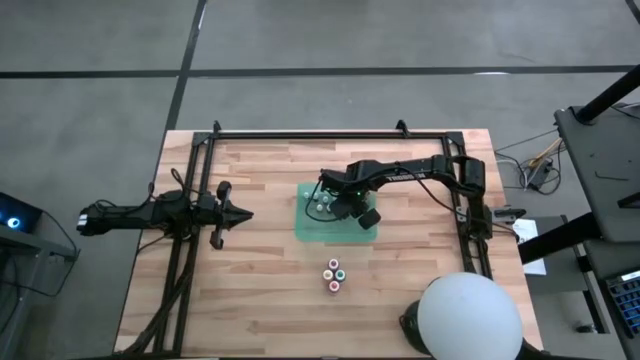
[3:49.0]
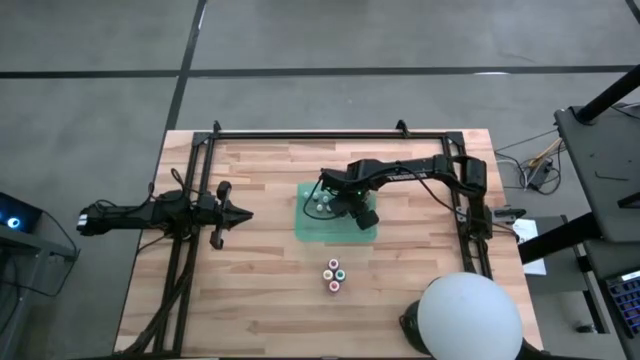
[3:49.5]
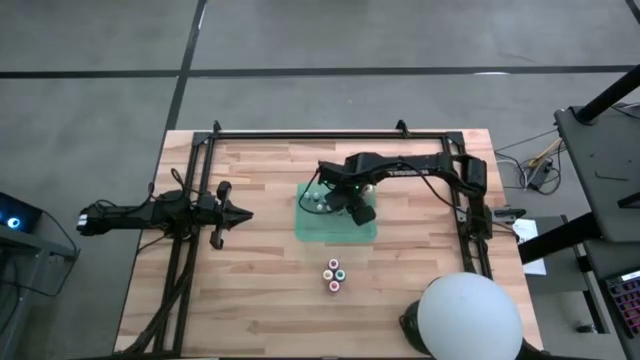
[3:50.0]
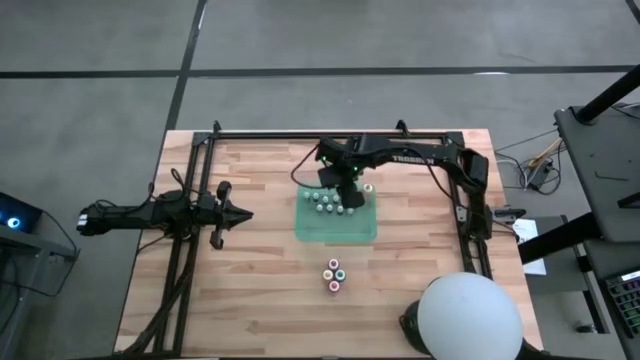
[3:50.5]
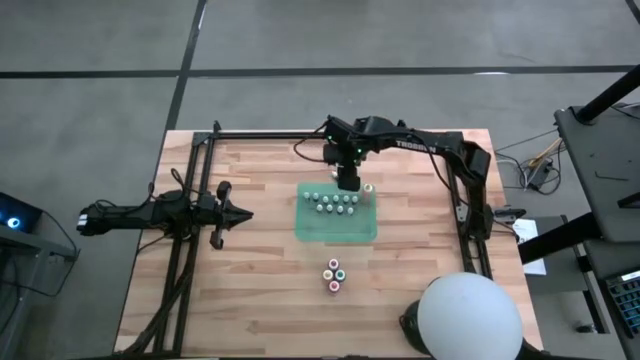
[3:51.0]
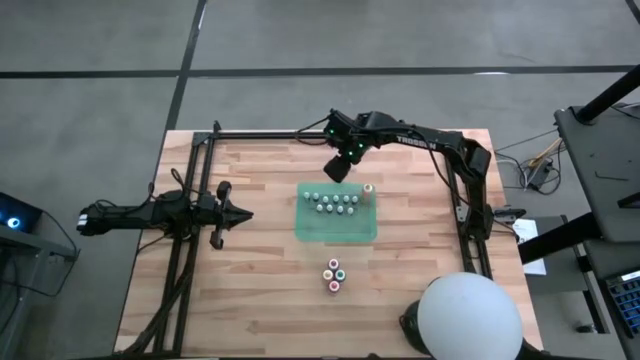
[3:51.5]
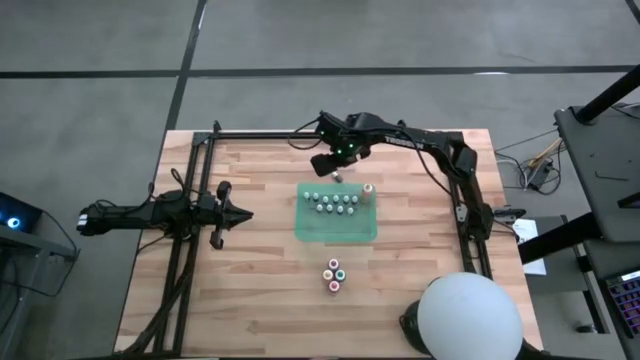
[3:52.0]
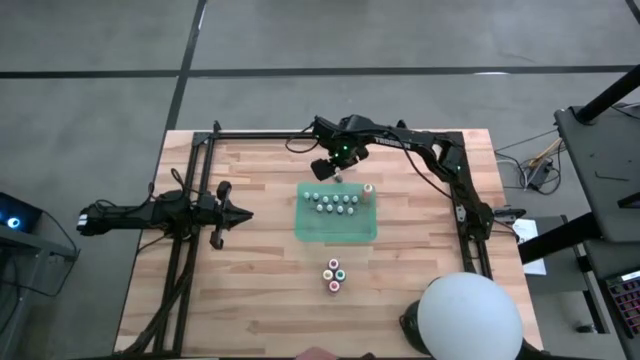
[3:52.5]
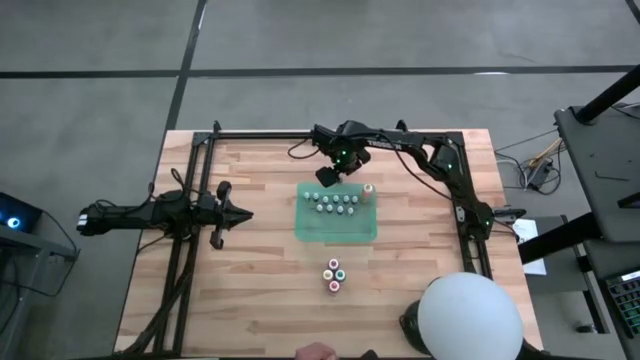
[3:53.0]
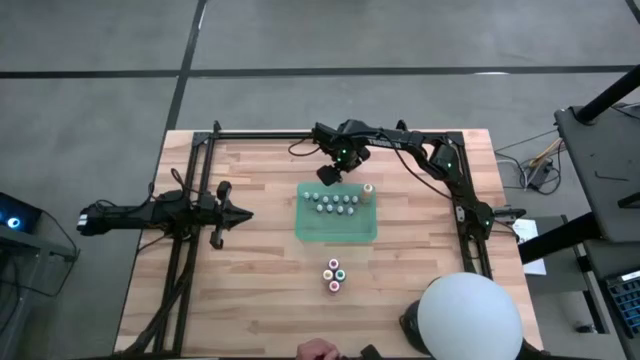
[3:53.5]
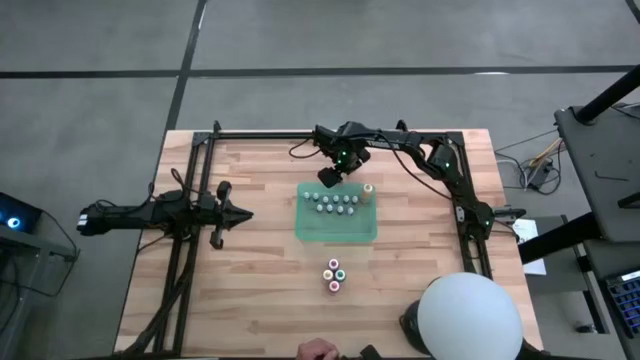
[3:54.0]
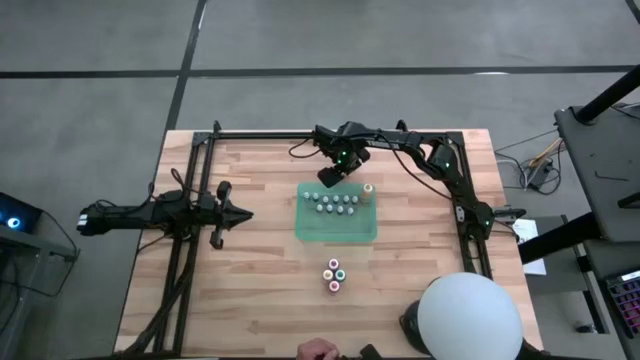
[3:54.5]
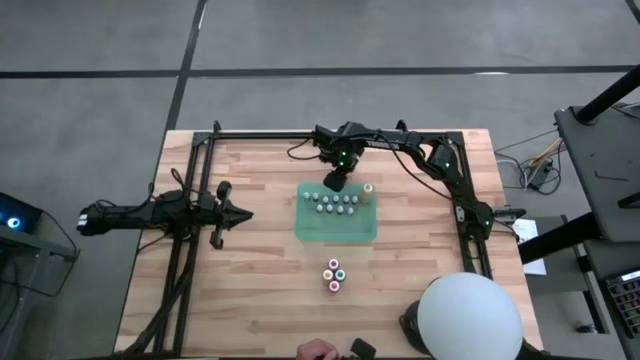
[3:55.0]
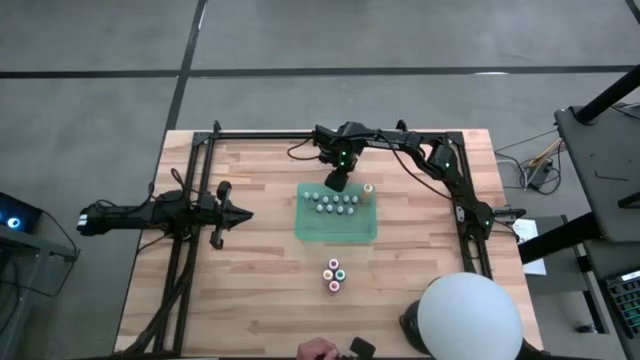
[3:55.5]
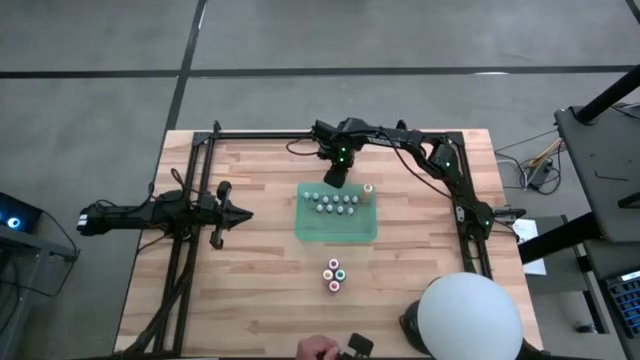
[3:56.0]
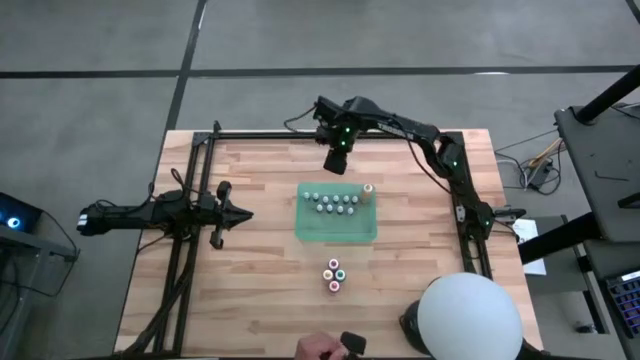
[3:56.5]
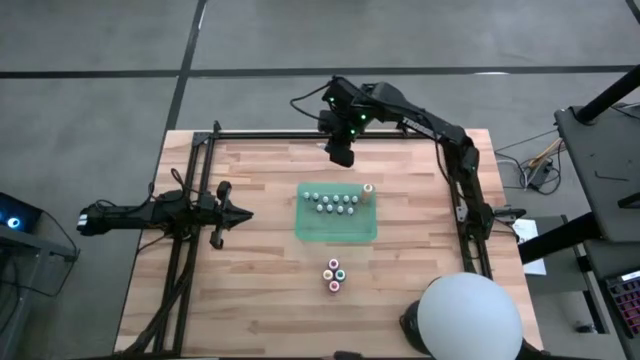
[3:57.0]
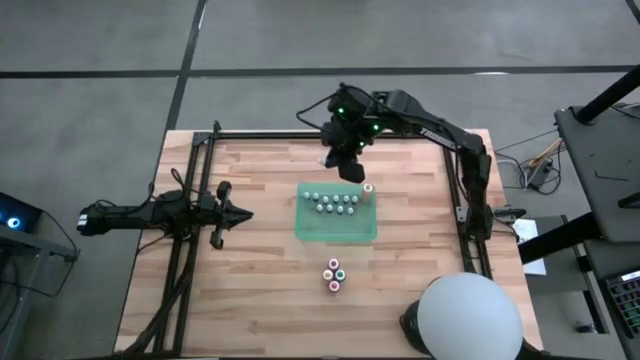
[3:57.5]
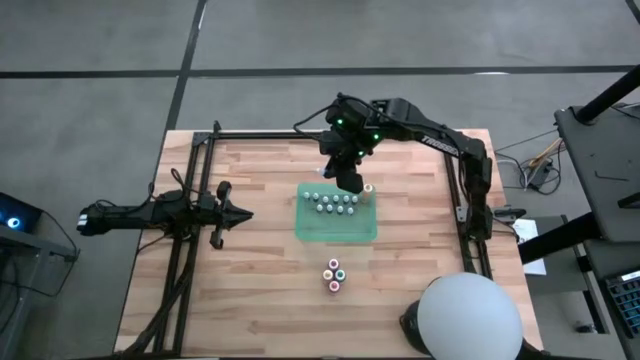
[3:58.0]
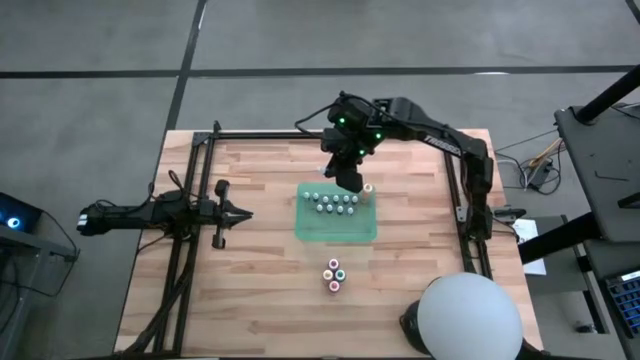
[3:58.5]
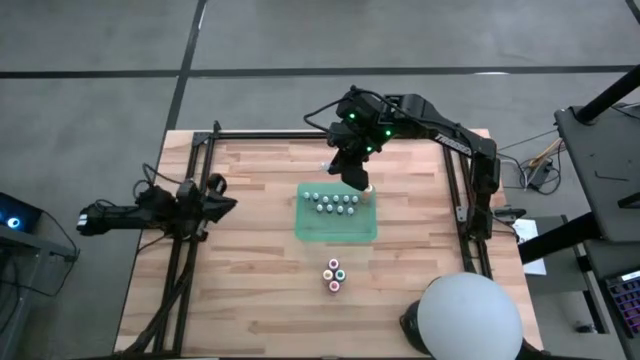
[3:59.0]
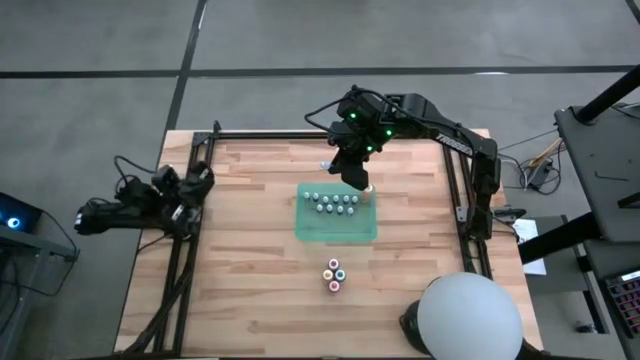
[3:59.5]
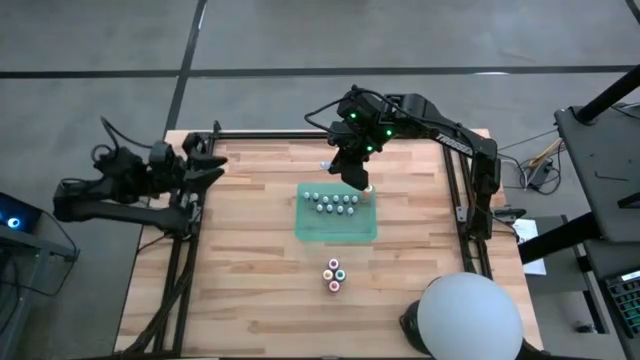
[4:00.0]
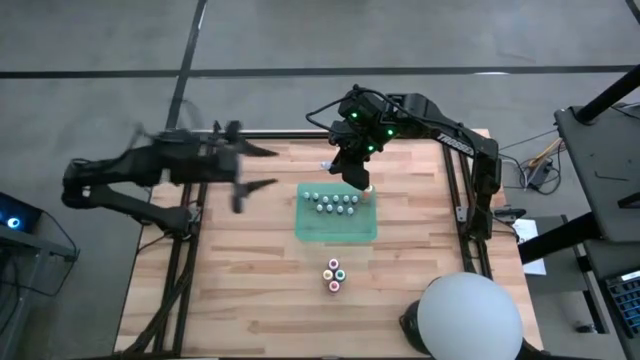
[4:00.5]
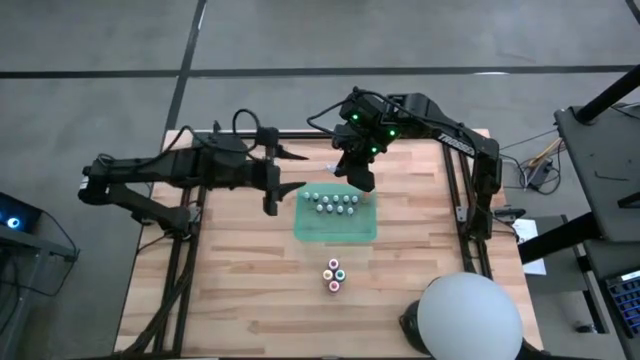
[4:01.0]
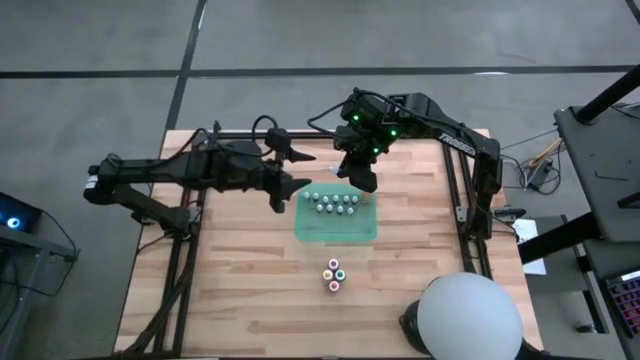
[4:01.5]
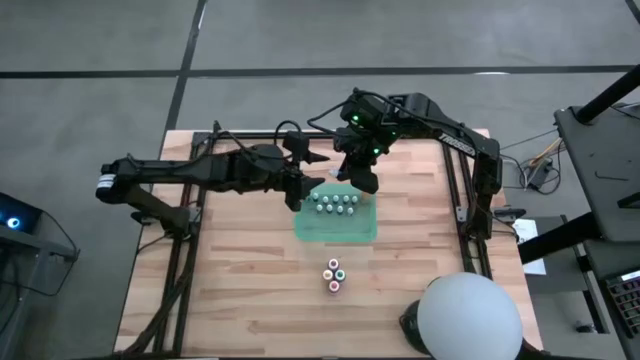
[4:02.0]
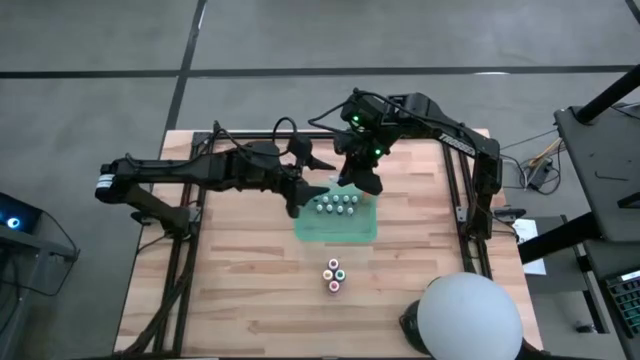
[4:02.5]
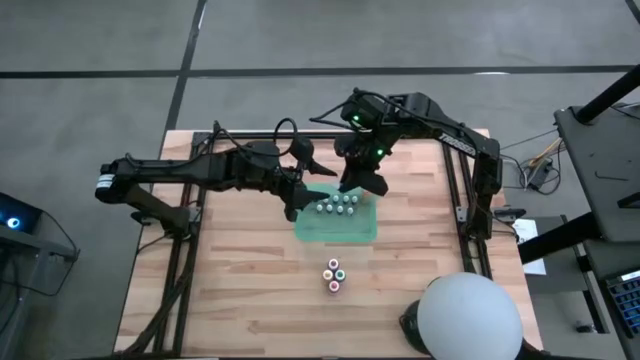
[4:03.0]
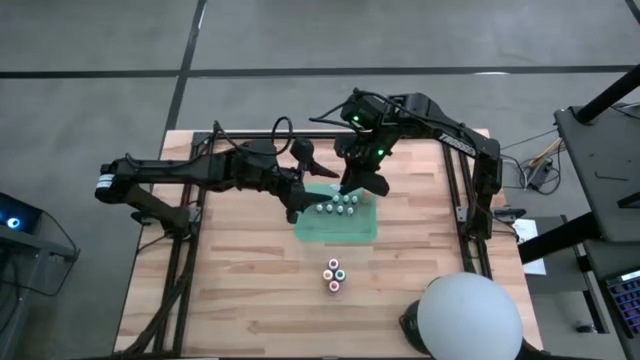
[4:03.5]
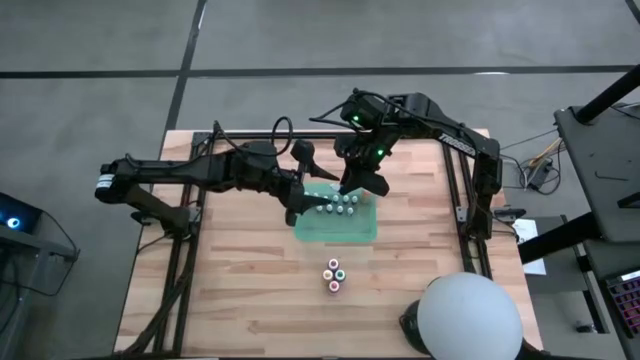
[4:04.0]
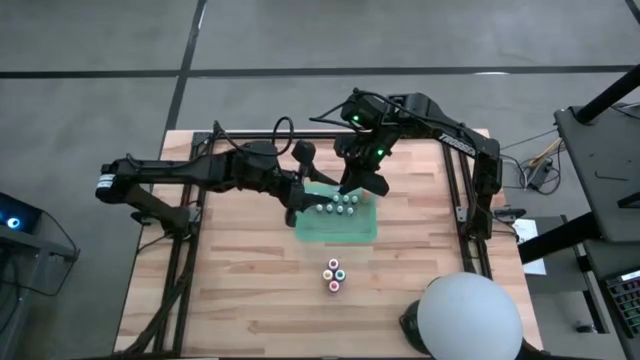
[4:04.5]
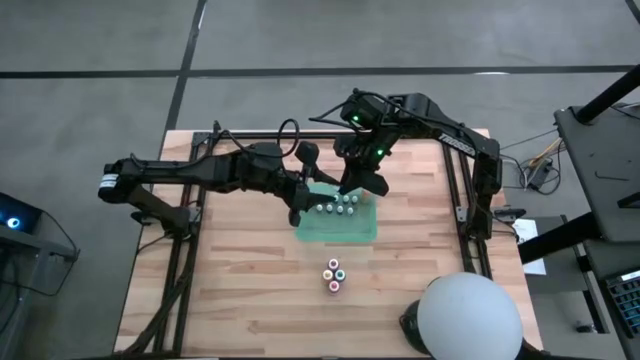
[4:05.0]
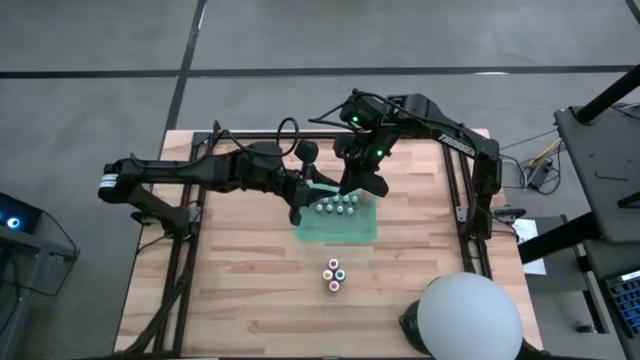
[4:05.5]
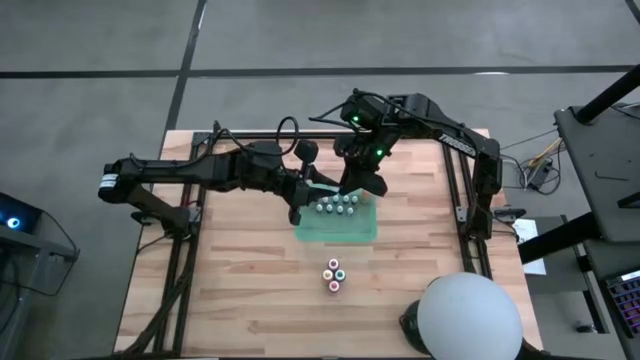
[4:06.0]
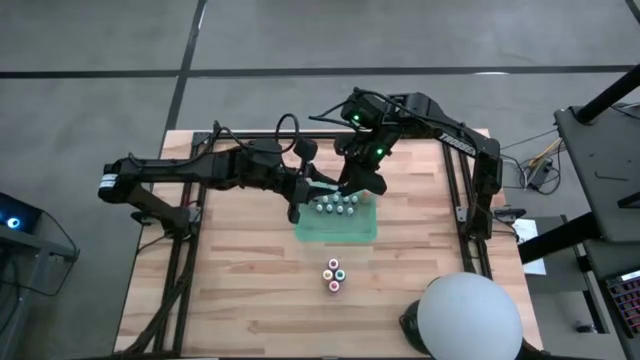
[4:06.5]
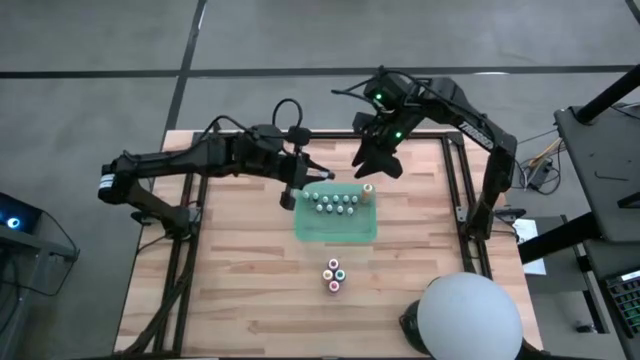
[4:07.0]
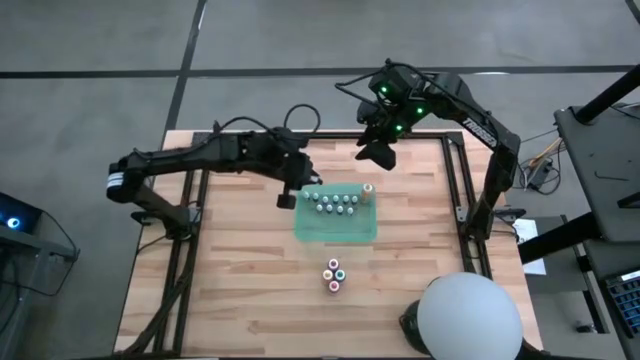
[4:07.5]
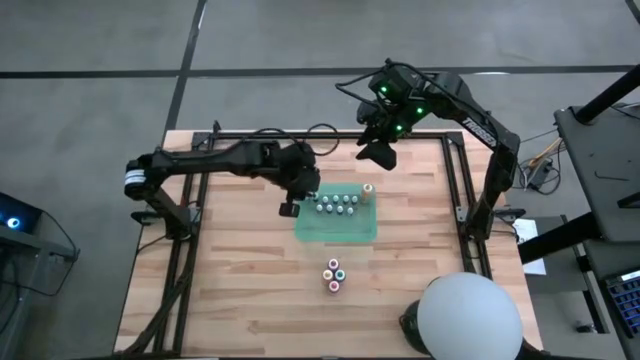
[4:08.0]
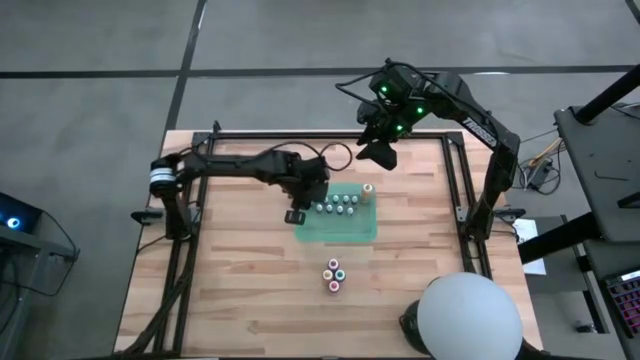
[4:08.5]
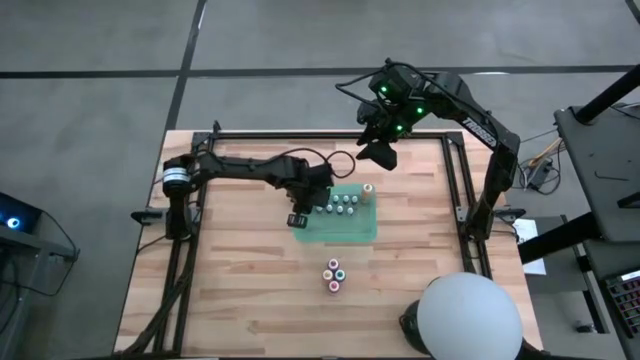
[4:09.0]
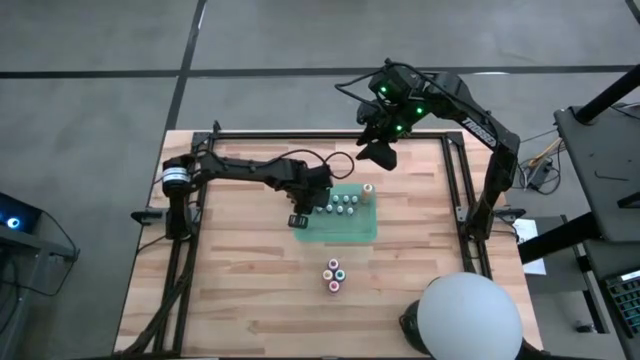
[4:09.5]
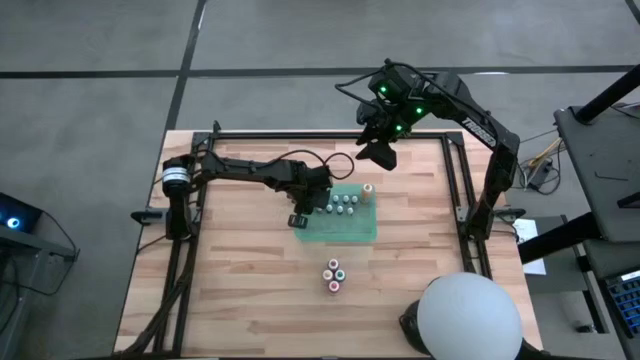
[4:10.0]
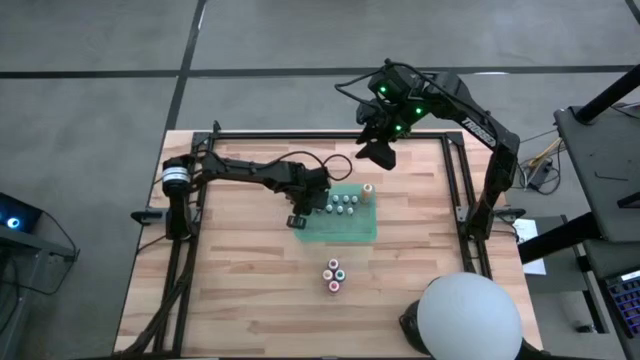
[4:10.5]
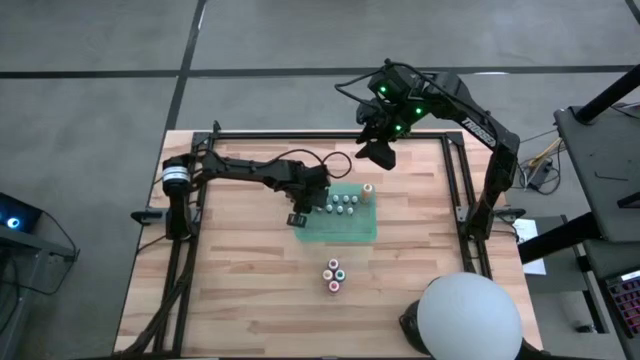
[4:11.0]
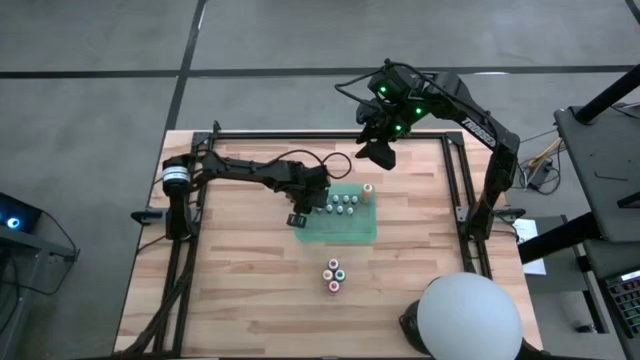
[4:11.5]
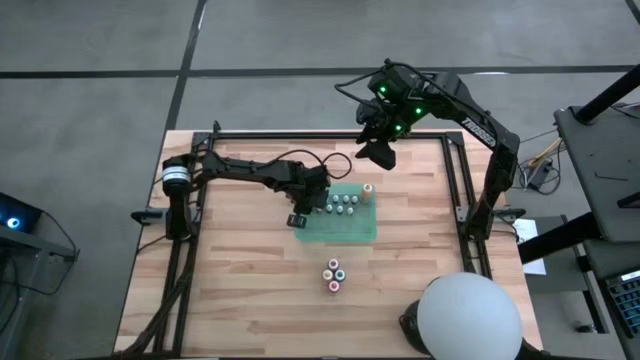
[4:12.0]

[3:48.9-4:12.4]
Task: Pick & Place food coloring
Put the small green food coloring bottle into the green container
